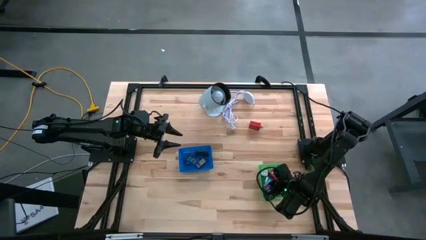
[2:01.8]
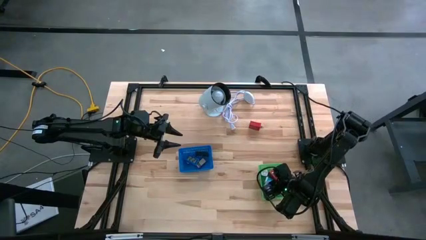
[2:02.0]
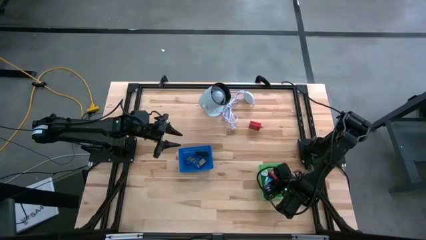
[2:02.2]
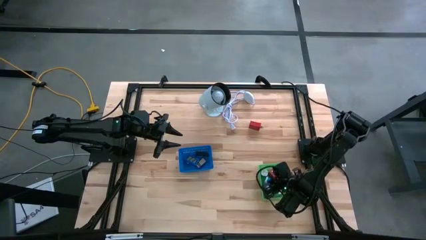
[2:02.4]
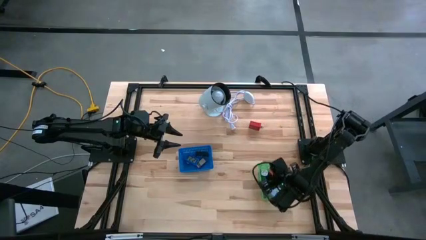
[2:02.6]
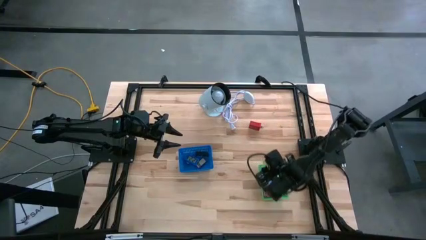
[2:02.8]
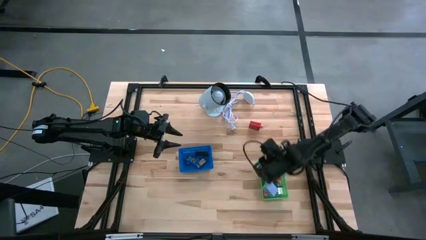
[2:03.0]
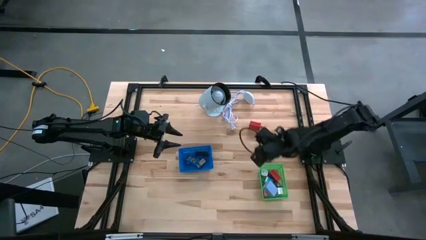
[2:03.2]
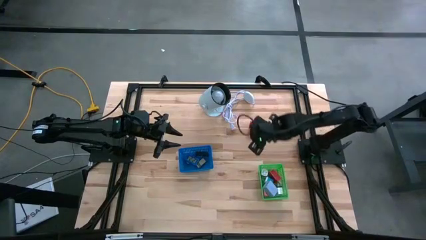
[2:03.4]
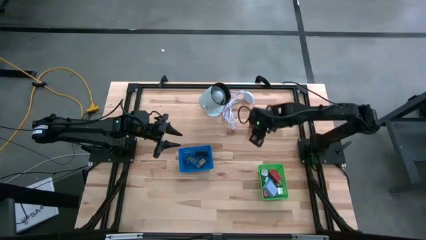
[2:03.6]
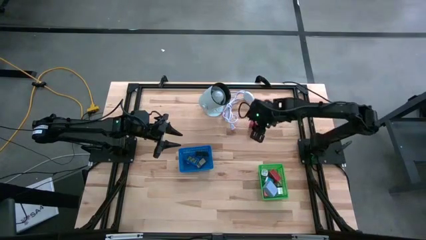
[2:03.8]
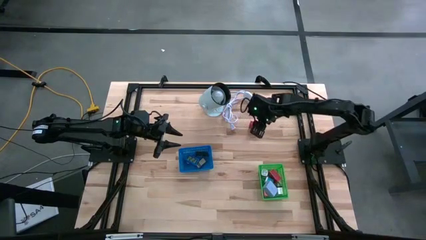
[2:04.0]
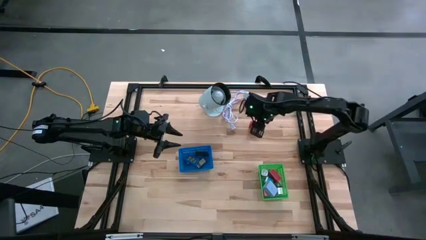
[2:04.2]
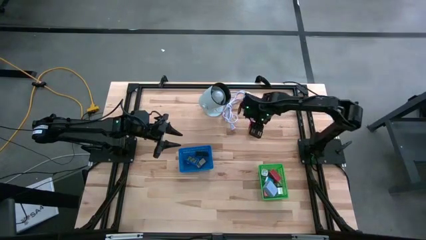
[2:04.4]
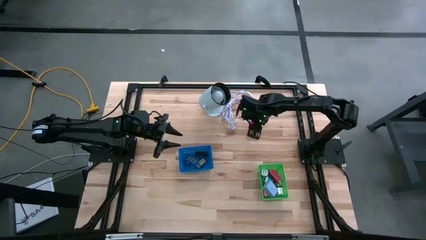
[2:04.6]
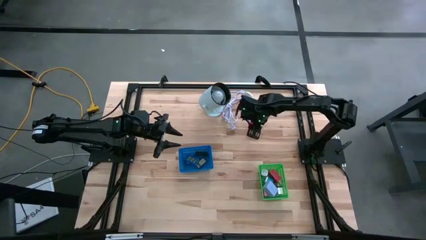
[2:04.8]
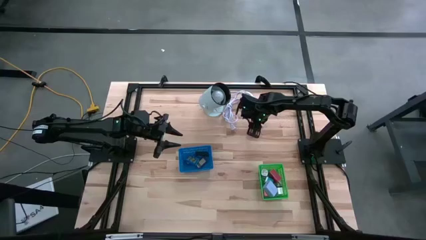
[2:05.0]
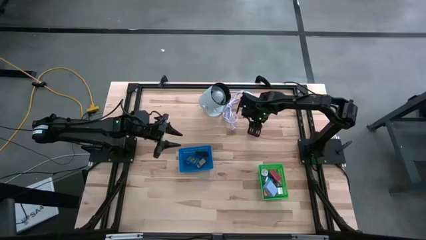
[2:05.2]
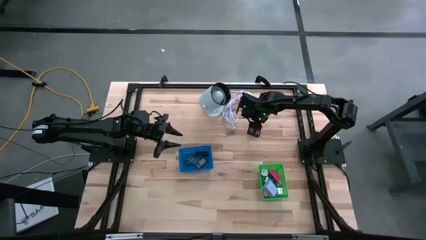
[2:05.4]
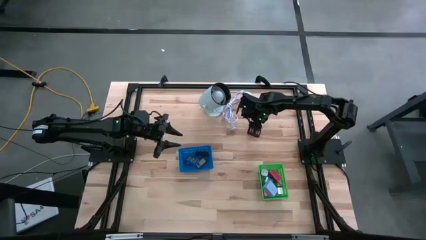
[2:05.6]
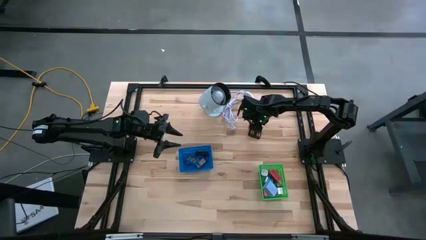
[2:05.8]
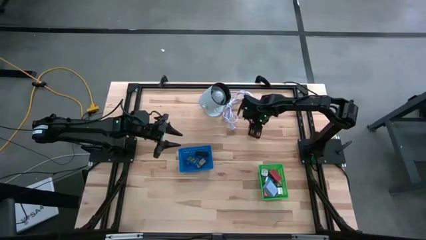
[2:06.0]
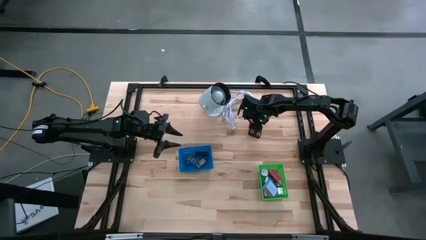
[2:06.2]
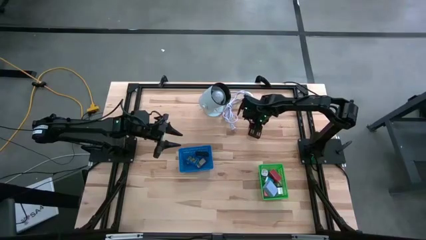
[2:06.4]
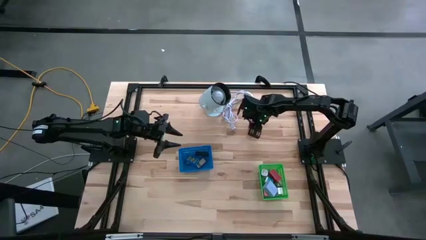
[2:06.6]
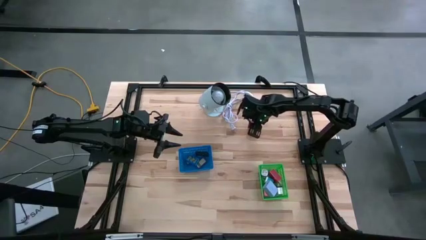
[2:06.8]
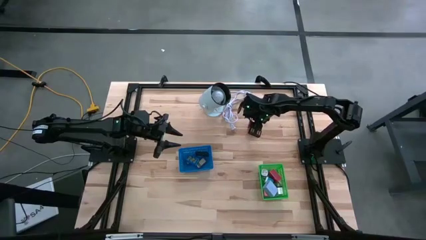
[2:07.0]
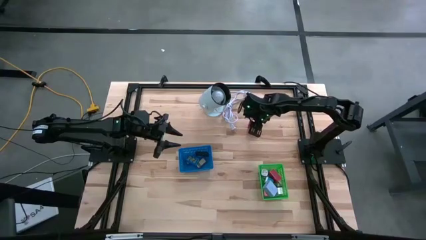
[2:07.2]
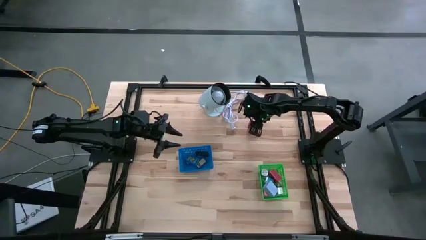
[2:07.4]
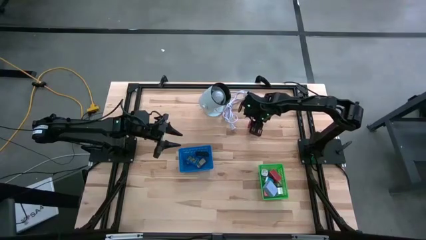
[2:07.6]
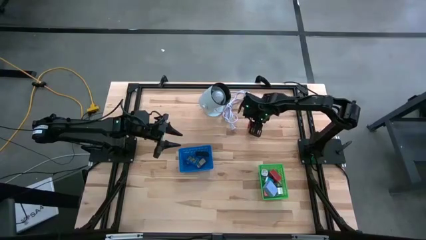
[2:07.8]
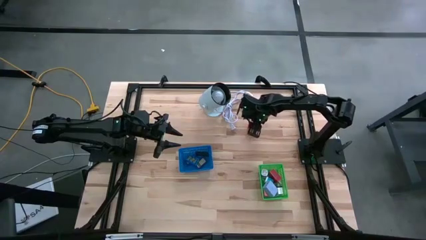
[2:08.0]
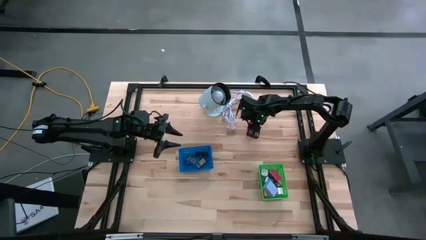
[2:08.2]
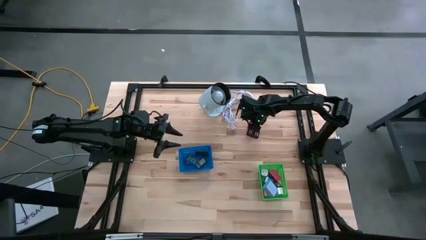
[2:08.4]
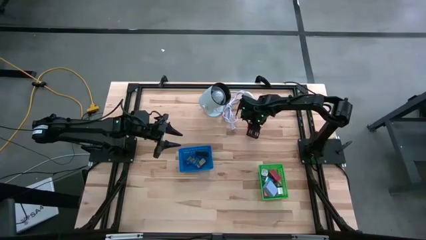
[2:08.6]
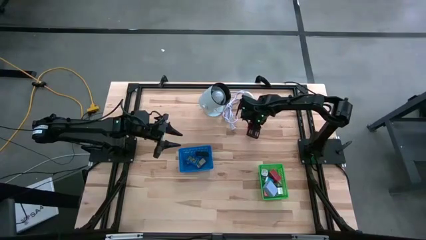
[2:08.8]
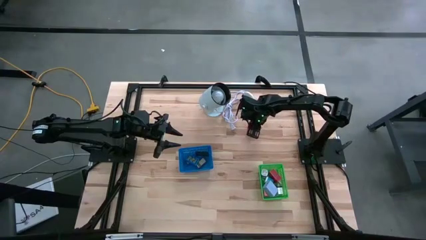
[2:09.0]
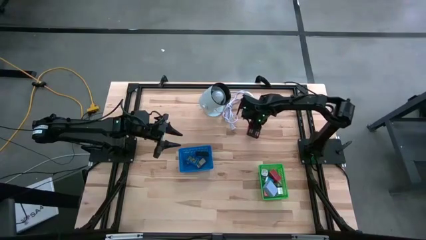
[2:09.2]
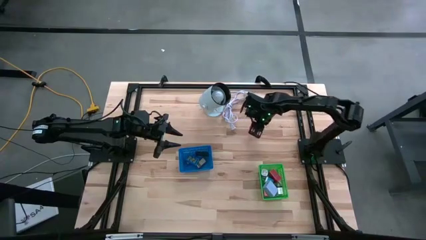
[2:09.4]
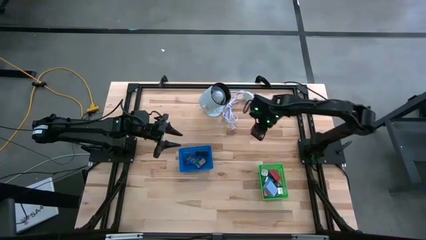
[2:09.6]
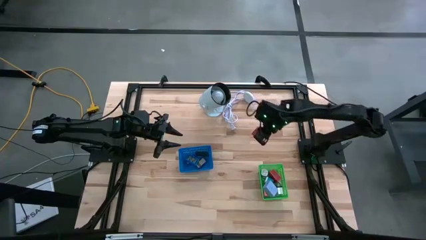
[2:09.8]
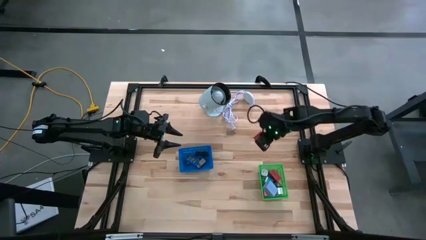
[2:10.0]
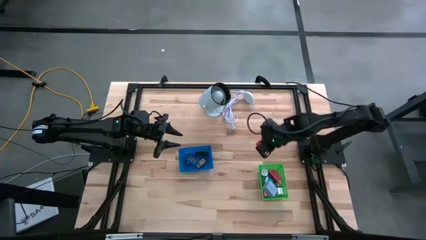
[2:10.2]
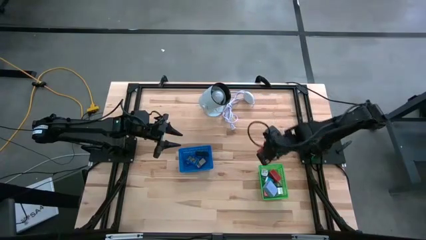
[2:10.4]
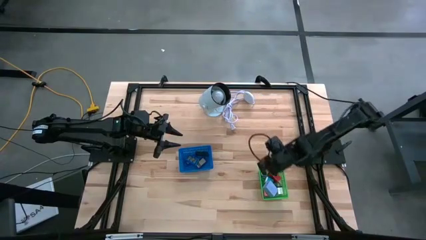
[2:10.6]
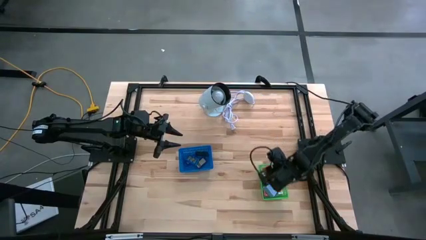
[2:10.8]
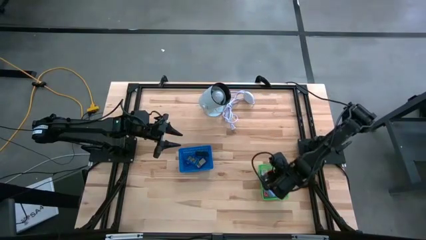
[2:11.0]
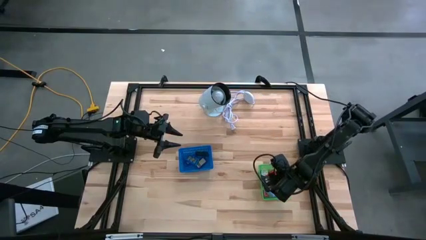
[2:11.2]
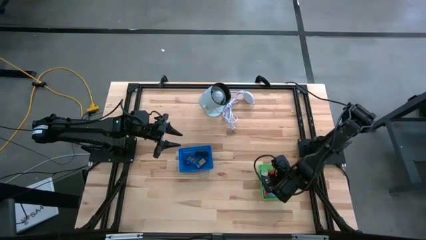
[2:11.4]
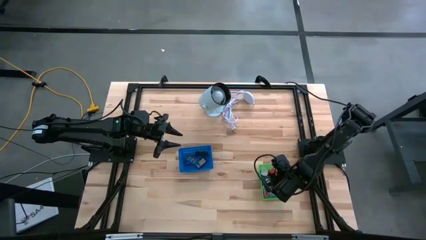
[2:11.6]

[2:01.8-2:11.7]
Task: Pick & Place Office items
Put the red charger adapter into the green bin

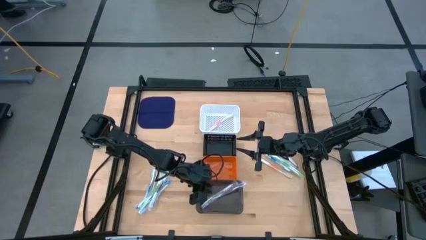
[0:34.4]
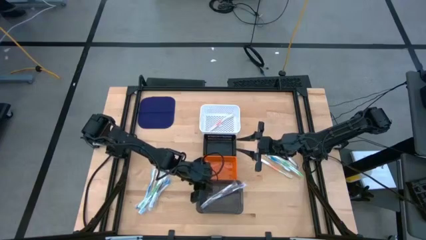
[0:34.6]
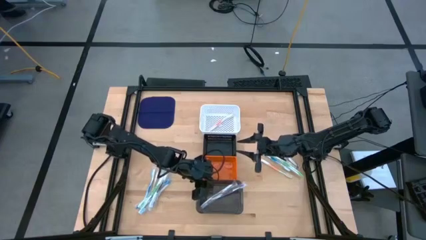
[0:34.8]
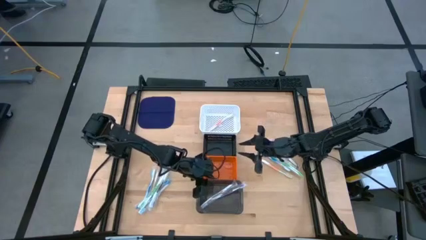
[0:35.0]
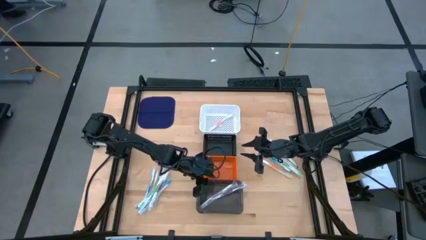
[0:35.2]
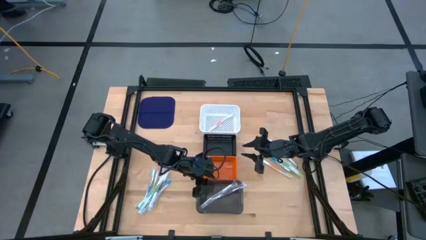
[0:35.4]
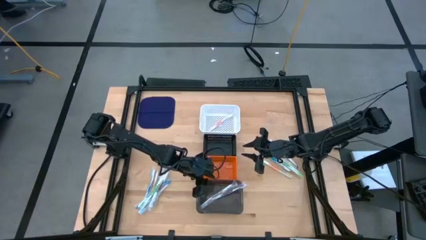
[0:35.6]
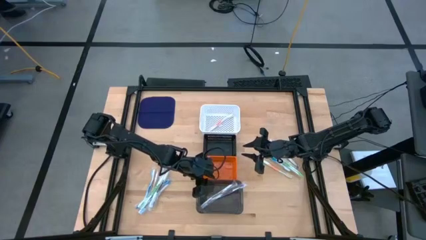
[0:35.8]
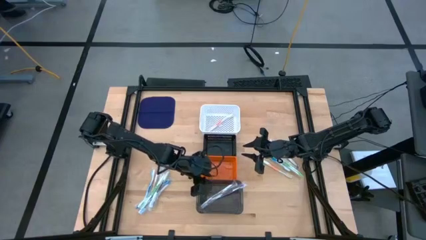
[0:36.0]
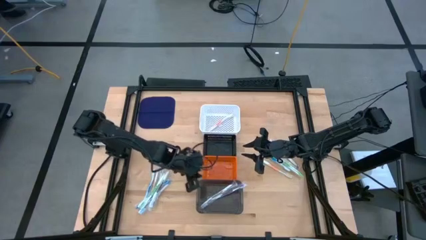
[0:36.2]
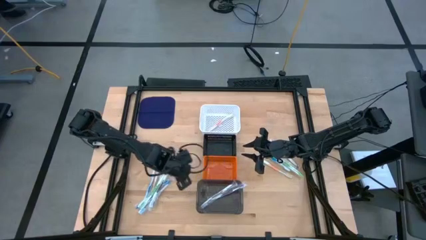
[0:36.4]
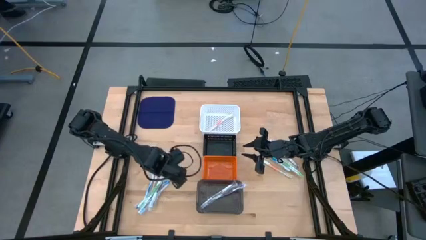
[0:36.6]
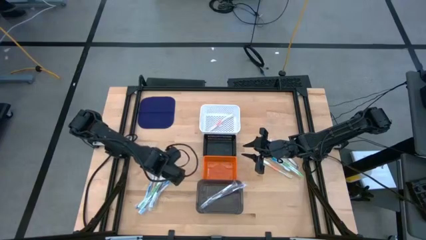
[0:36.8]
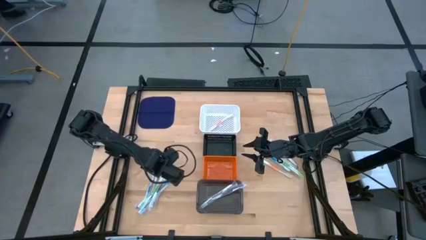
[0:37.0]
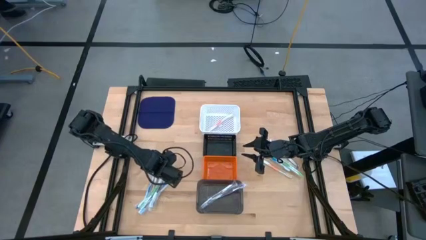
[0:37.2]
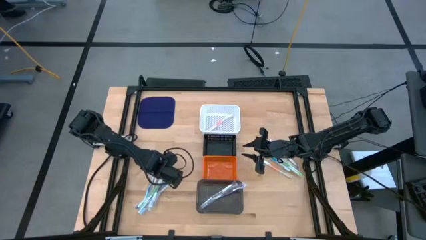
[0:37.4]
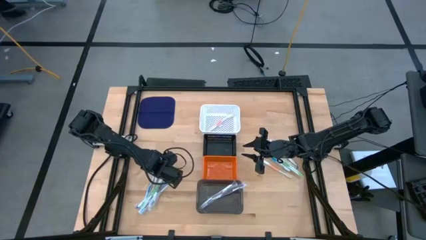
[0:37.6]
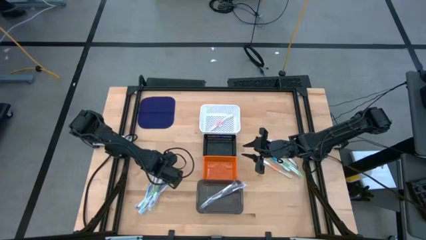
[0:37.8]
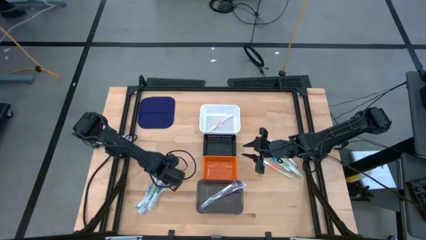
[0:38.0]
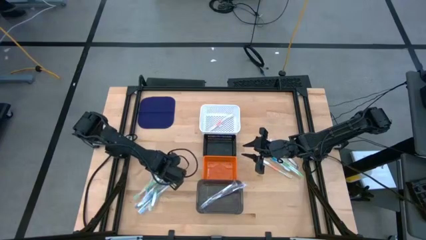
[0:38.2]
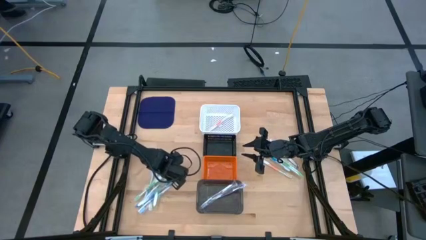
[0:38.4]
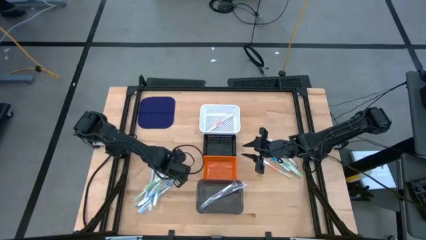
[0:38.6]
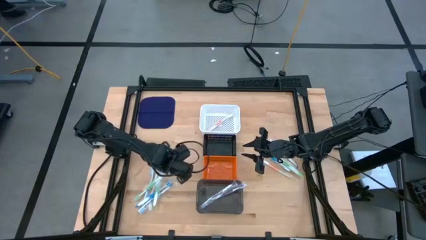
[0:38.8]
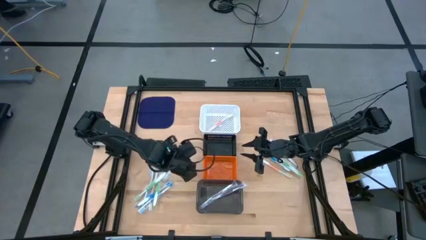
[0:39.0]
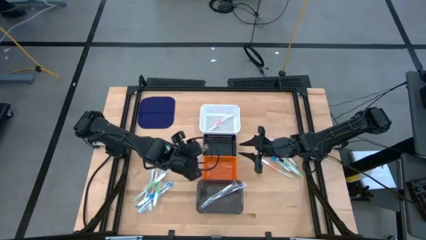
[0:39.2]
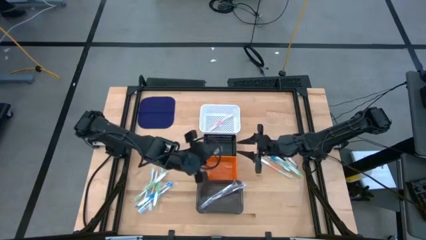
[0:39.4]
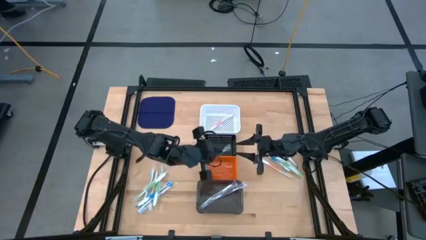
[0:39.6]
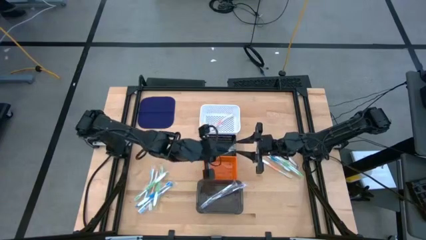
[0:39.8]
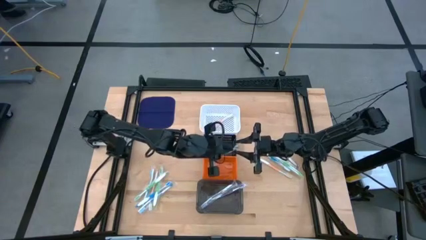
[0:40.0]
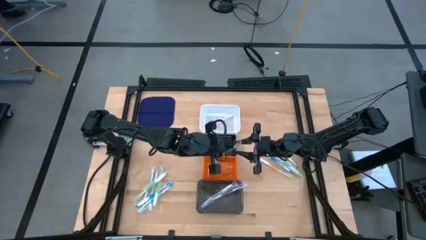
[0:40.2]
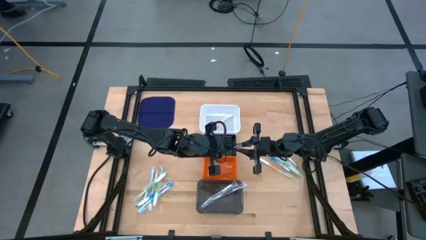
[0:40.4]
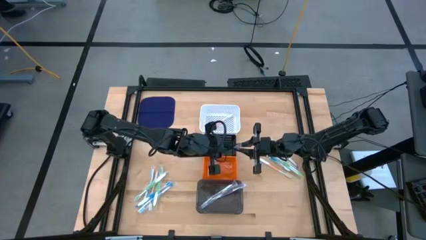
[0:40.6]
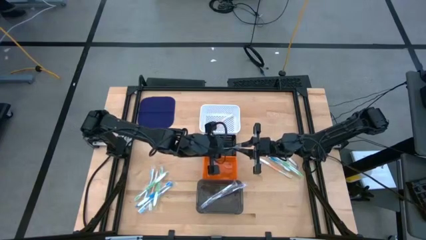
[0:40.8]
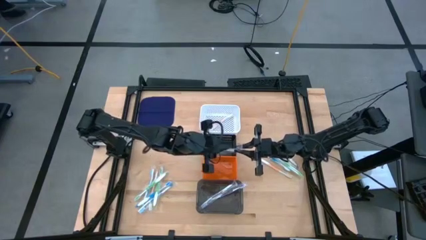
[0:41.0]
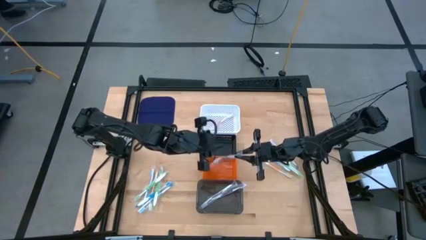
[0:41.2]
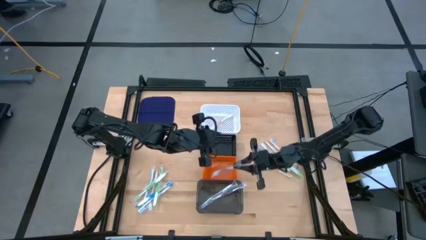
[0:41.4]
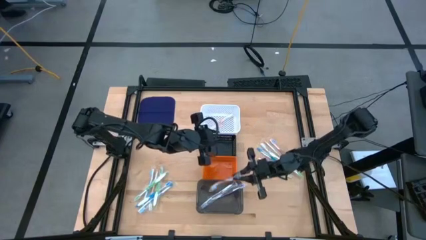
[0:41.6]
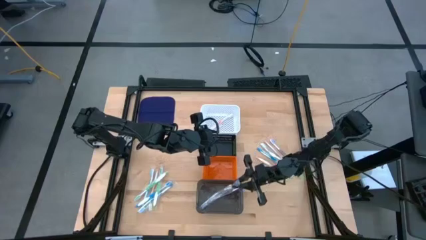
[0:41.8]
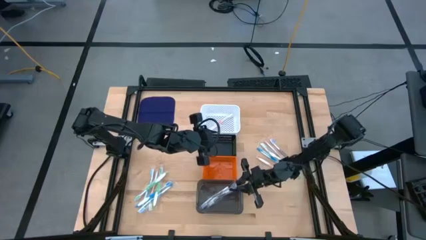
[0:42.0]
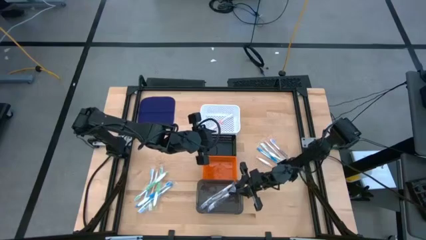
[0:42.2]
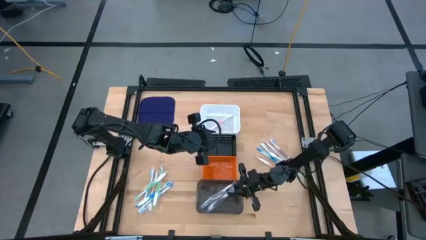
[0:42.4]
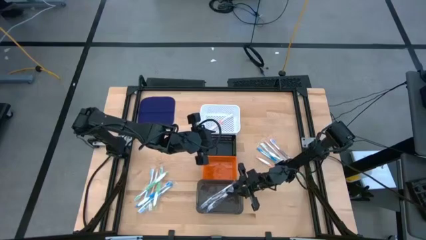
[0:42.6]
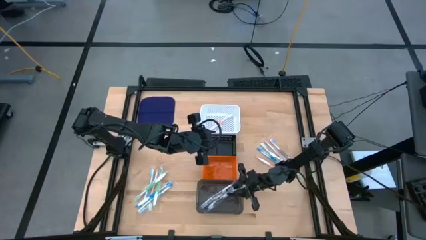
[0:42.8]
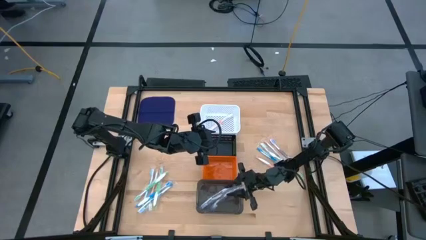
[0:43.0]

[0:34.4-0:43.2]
Task: Pick & Place Toothbrushes
Put the purple toothbrush into the black bin
